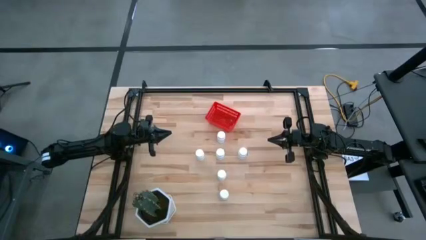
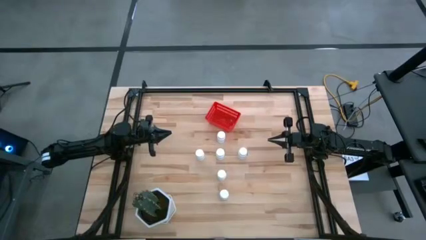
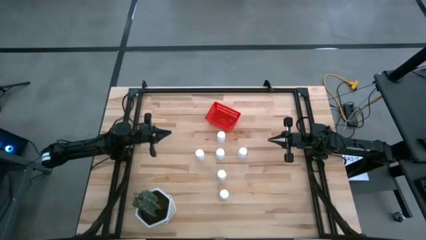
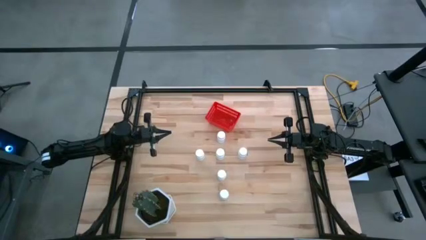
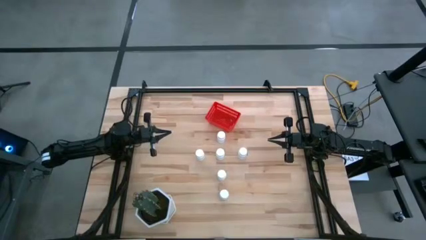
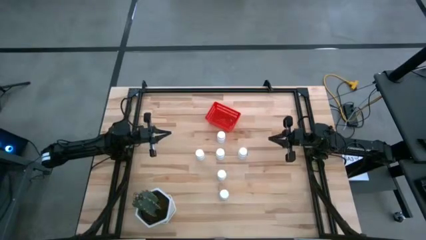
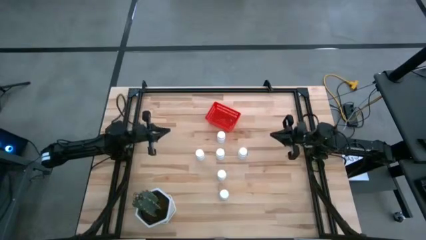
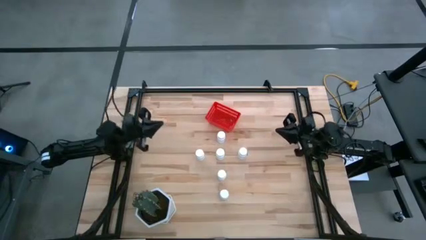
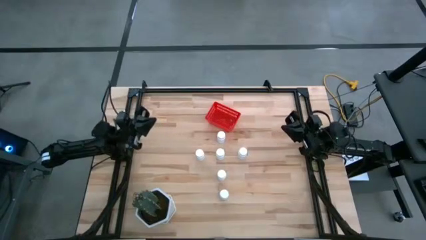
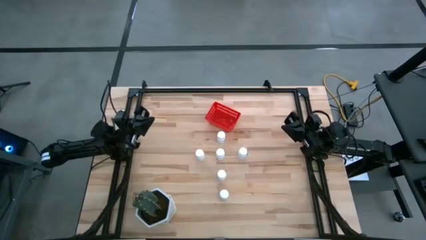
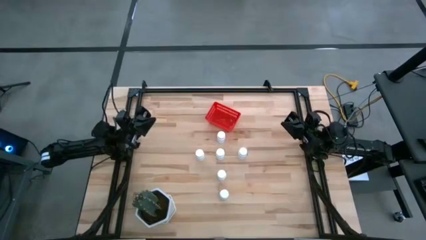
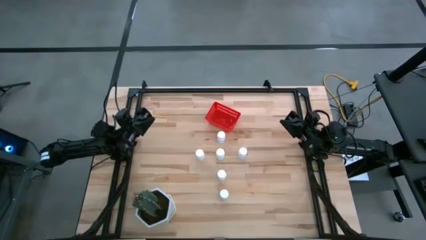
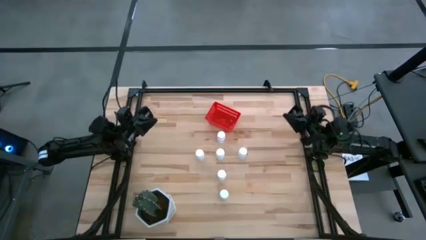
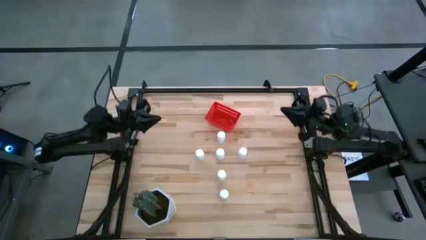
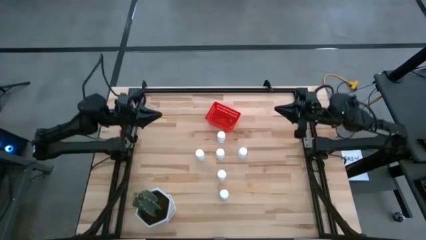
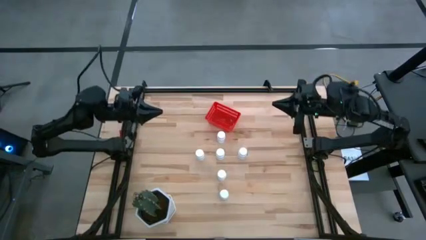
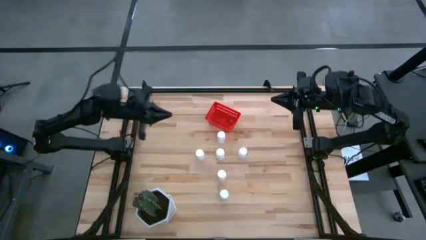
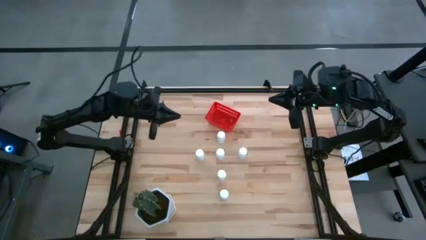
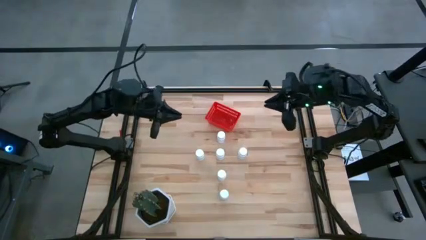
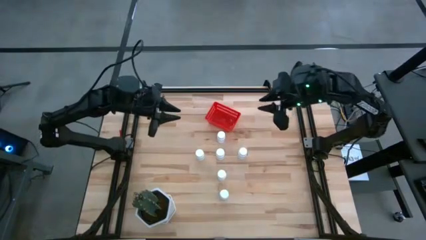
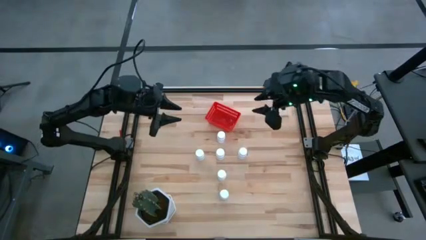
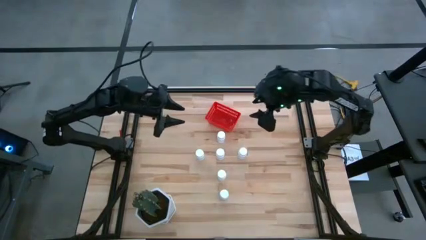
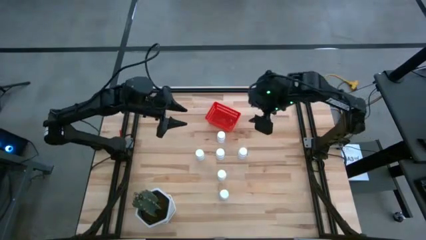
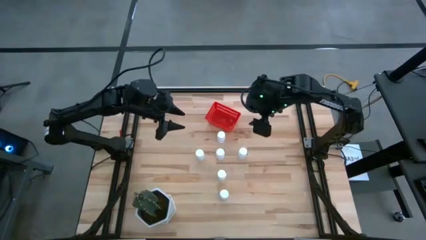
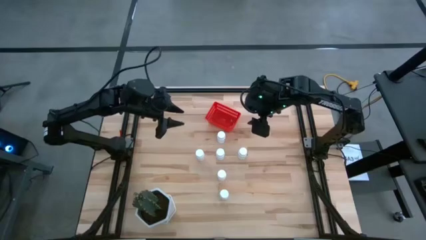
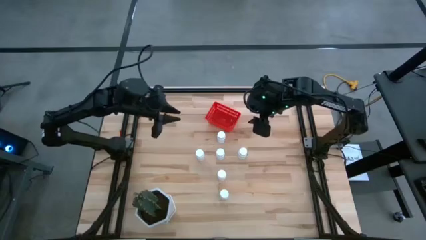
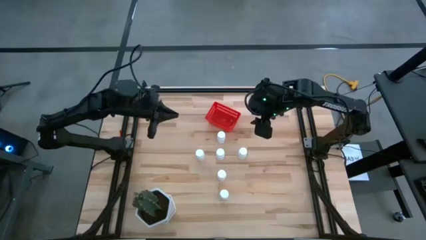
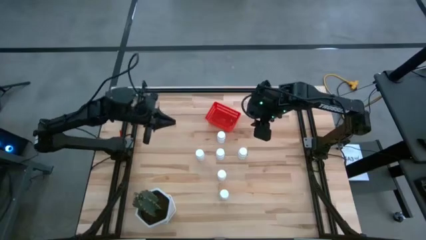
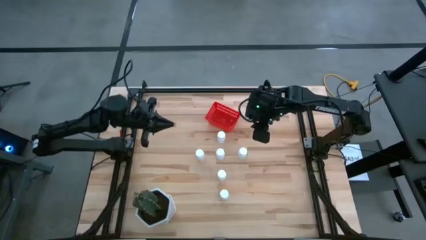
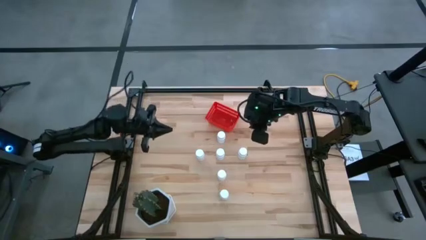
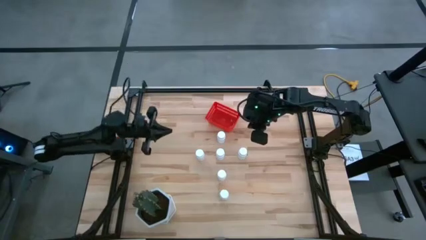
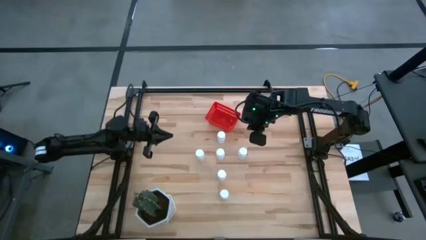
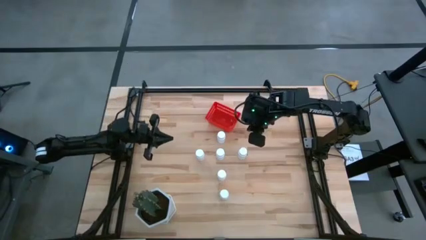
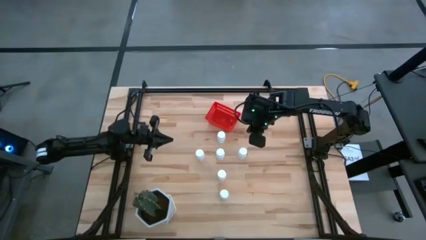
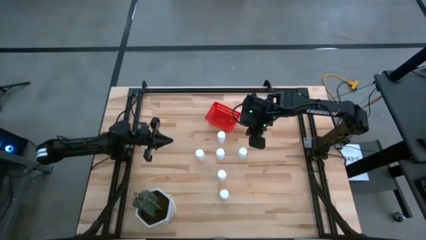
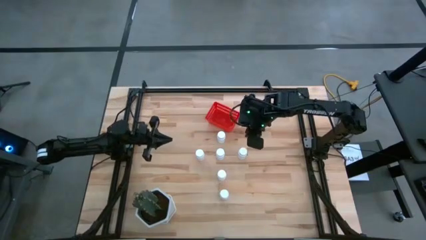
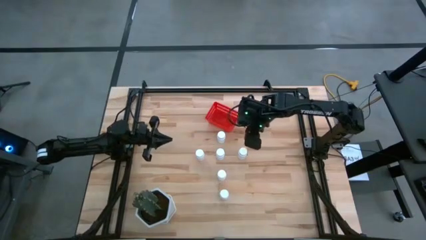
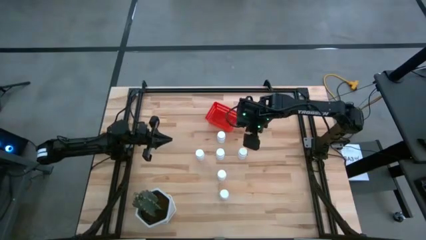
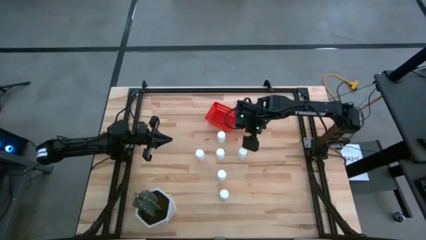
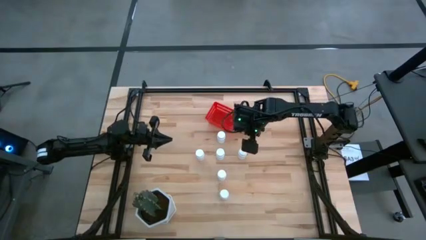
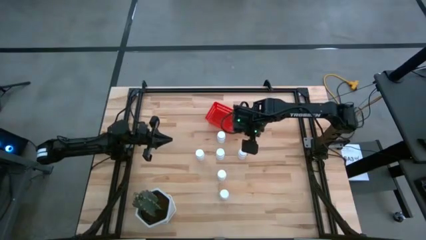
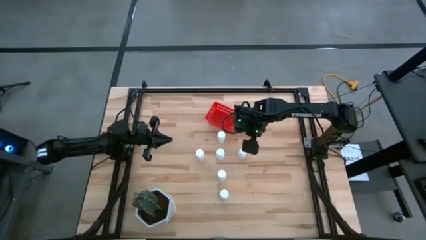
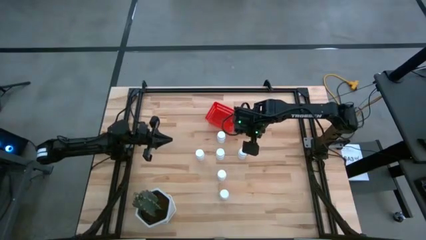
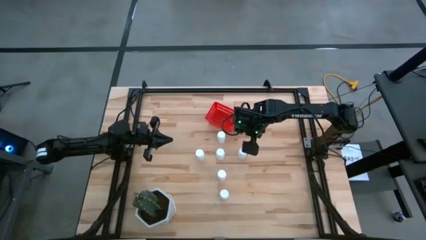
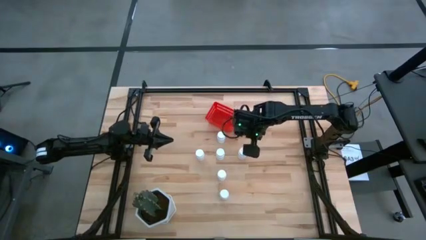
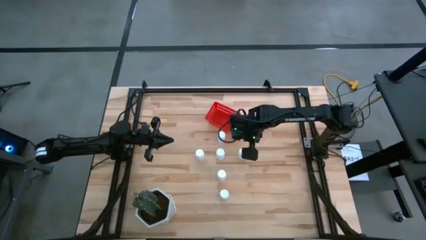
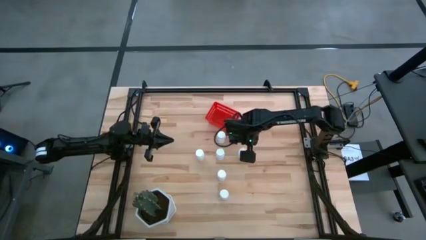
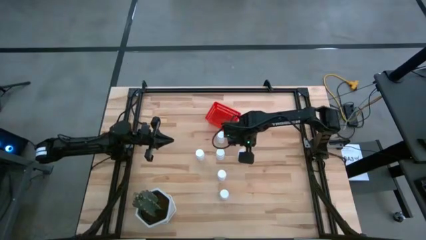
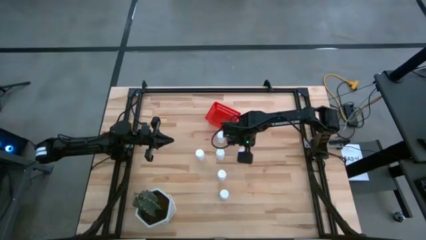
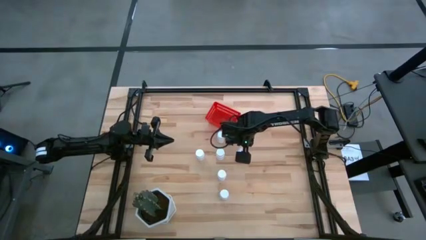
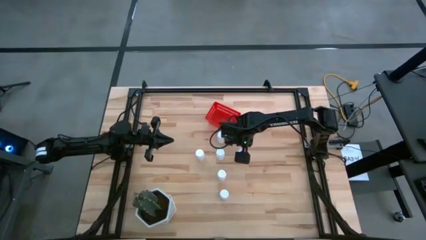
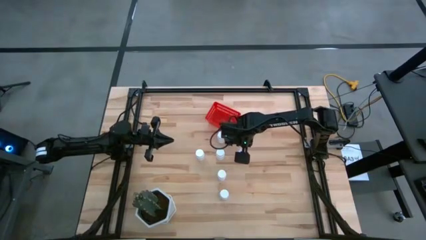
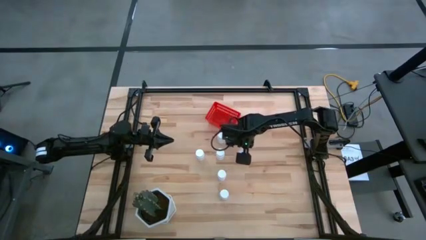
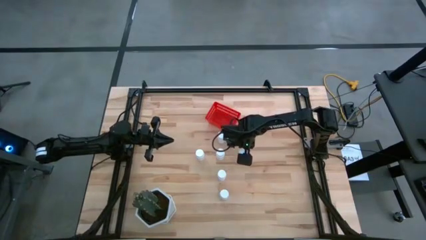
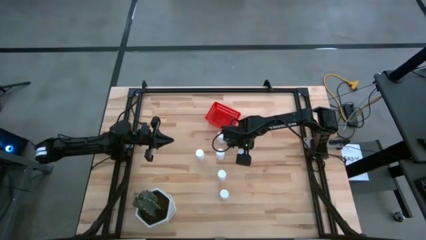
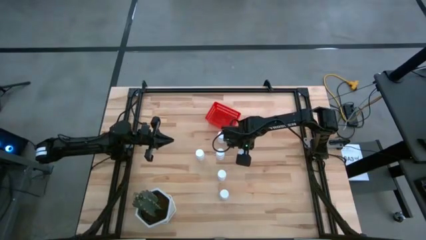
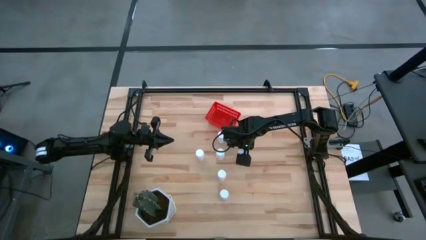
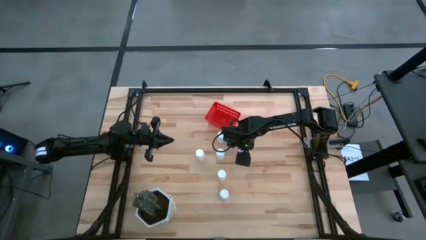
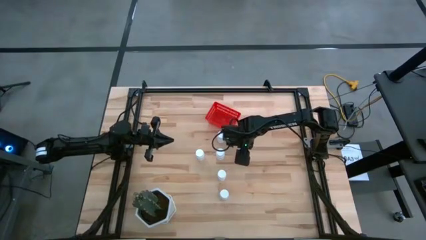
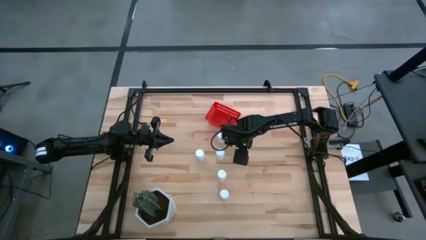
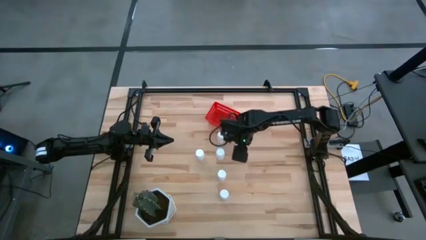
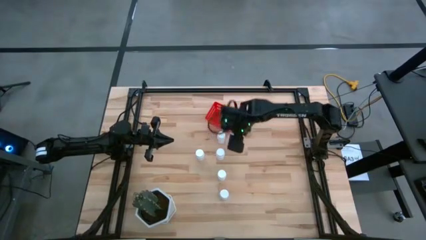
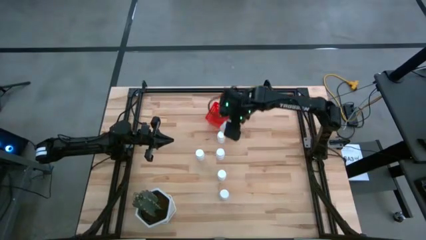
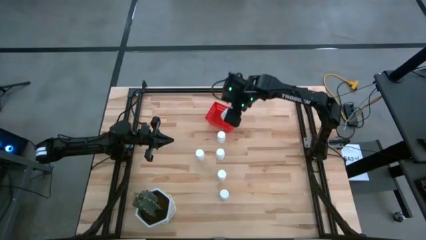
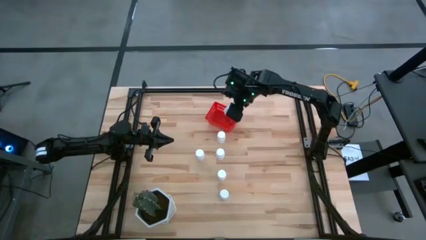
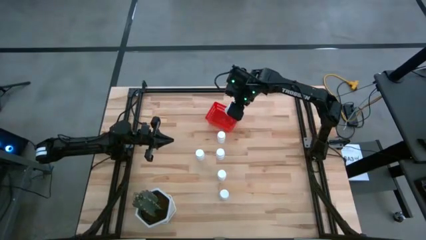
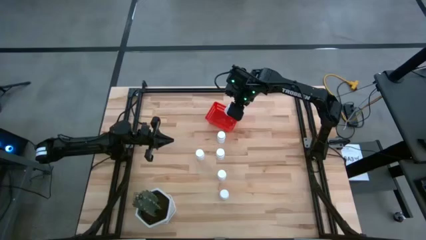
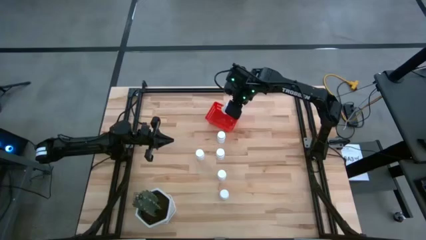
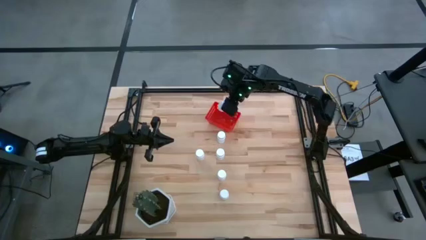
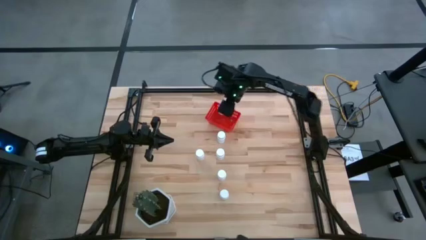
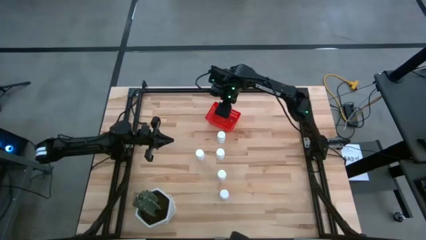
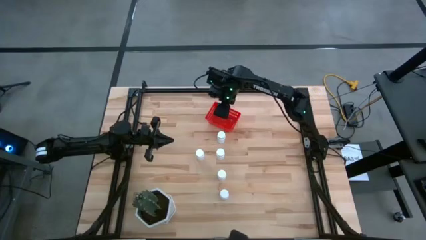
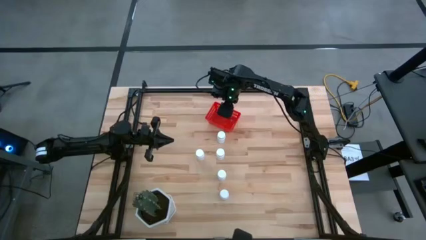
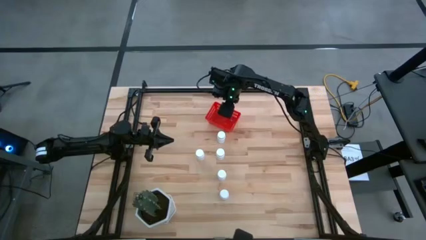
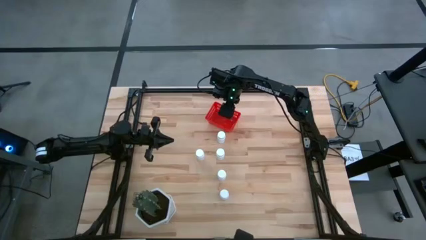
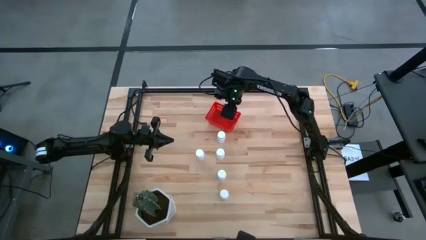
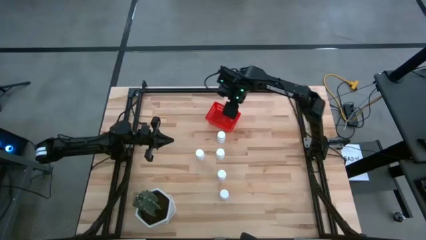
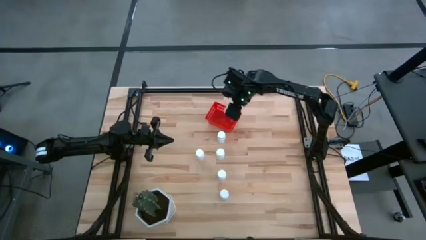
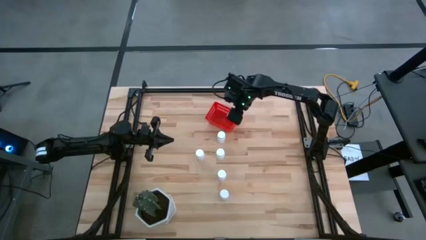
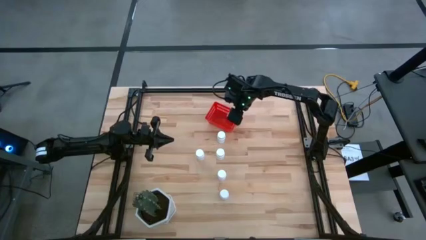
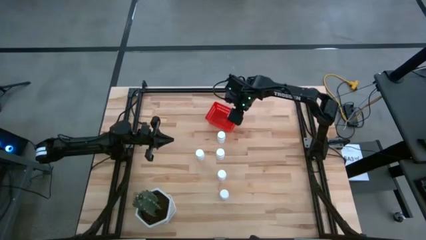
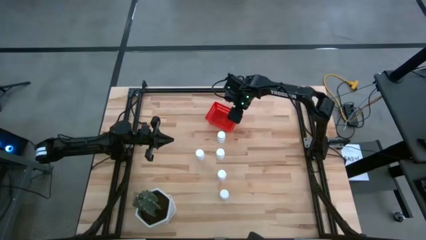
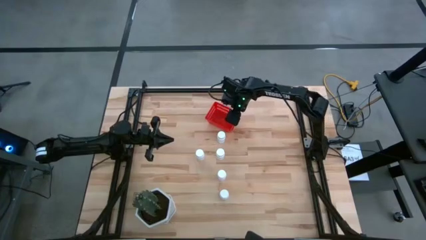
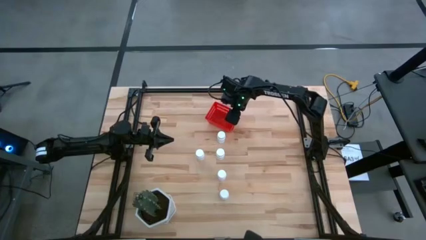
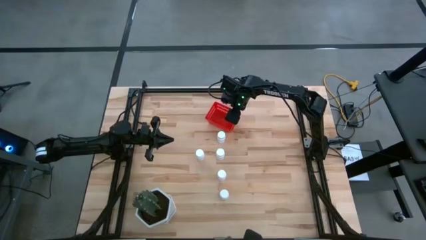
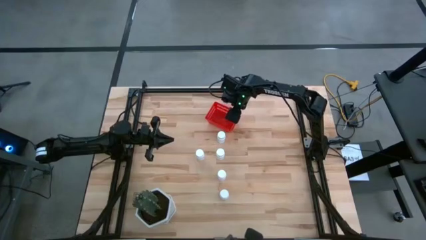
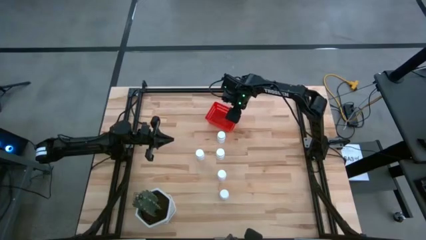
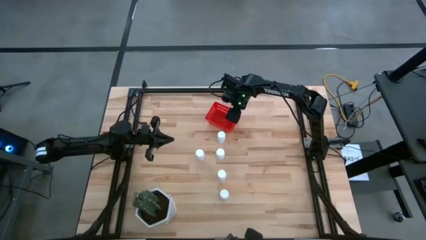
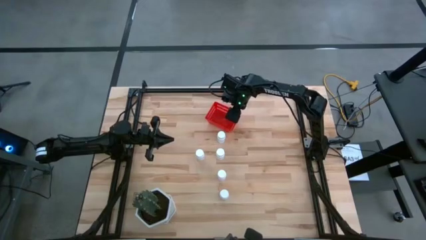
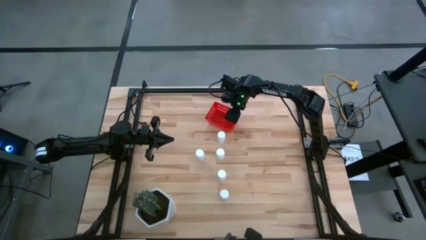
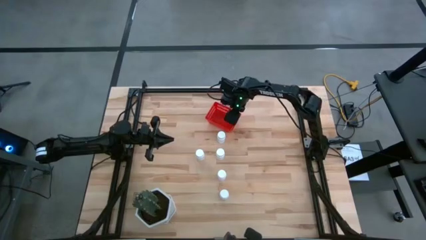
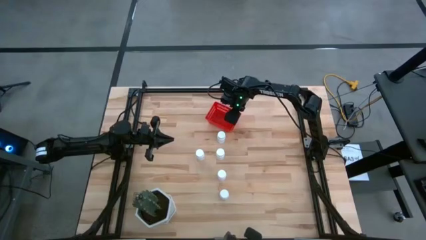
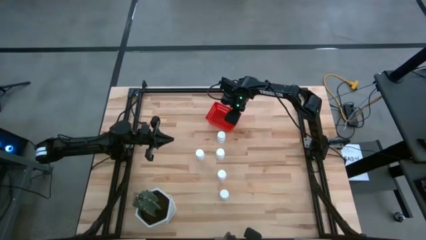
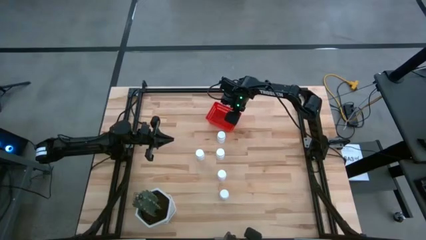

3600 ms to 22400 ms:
Task: Pick and place pill bottles into a basket
Put the white pill bottle into the red bin
